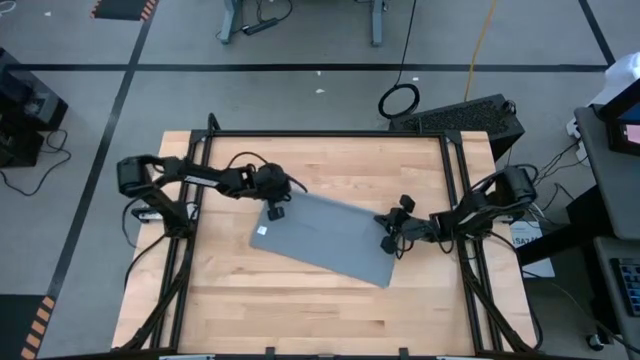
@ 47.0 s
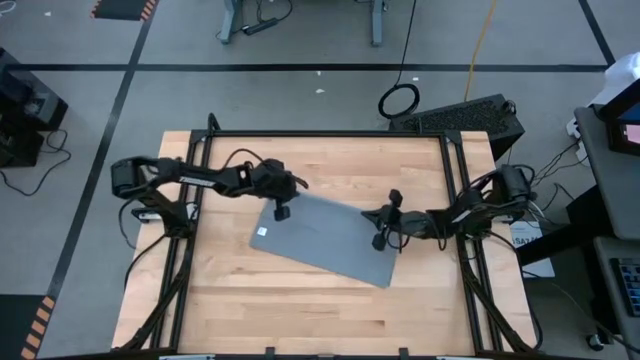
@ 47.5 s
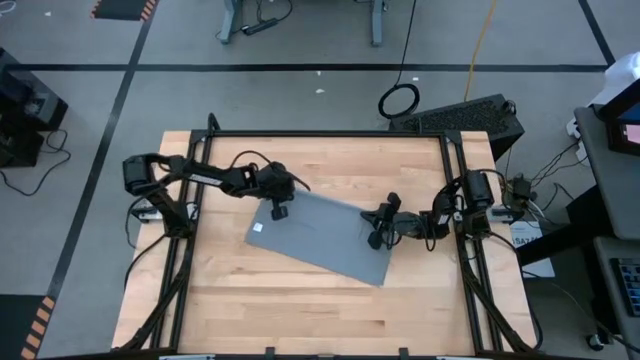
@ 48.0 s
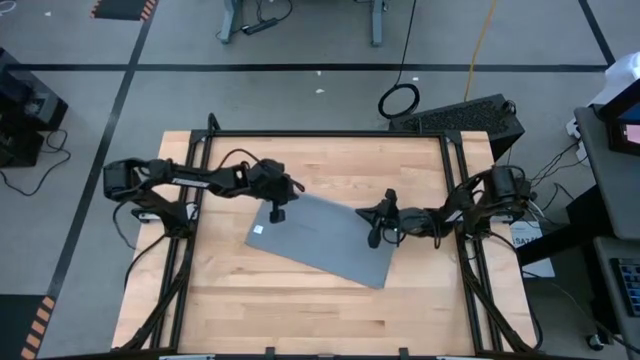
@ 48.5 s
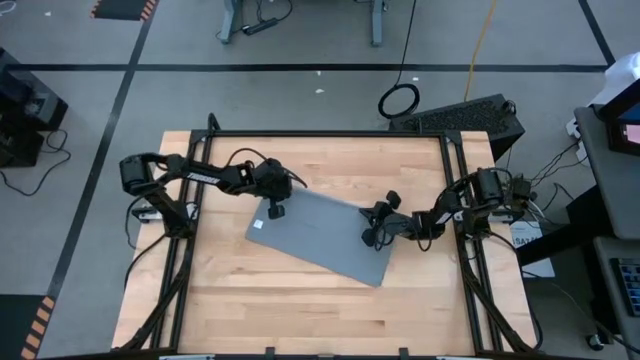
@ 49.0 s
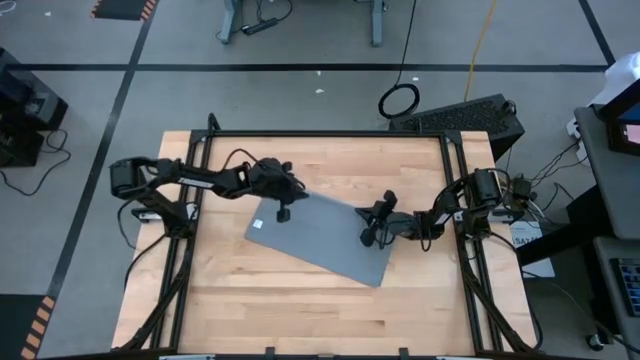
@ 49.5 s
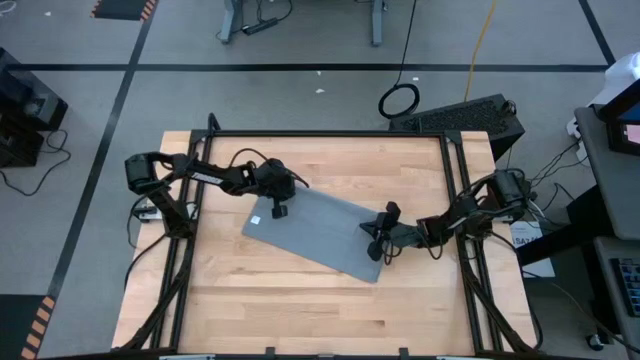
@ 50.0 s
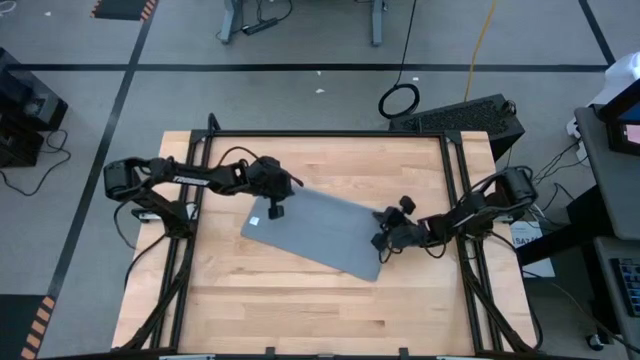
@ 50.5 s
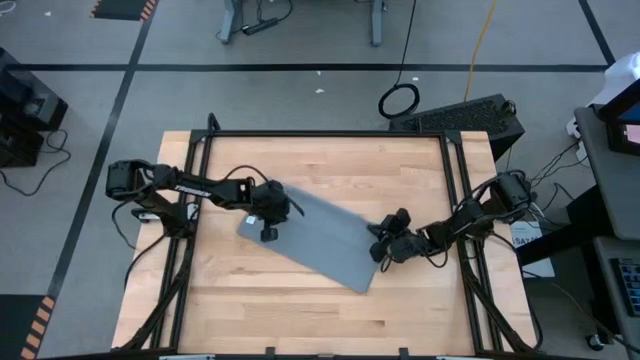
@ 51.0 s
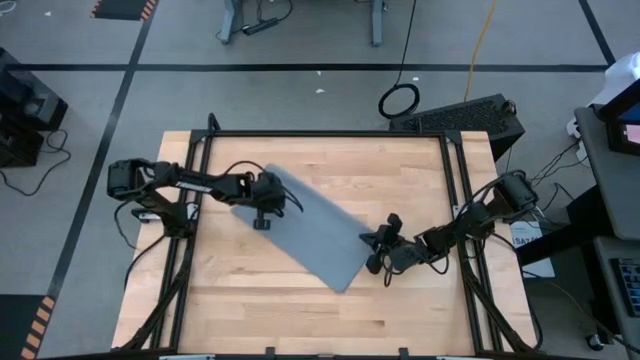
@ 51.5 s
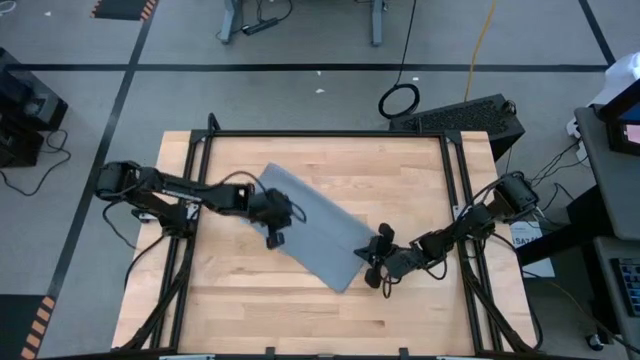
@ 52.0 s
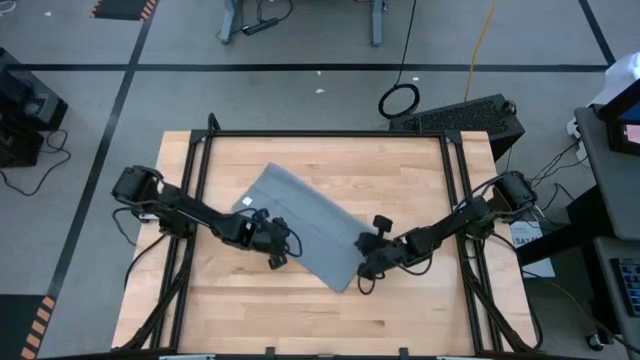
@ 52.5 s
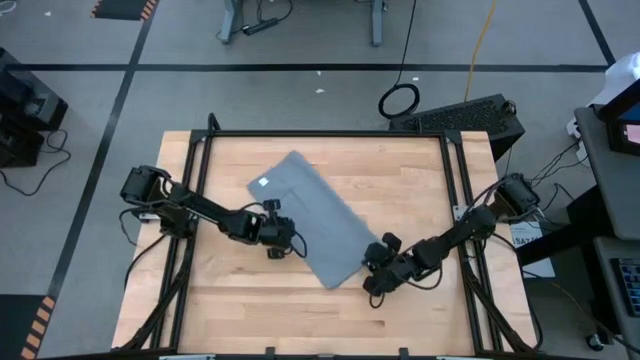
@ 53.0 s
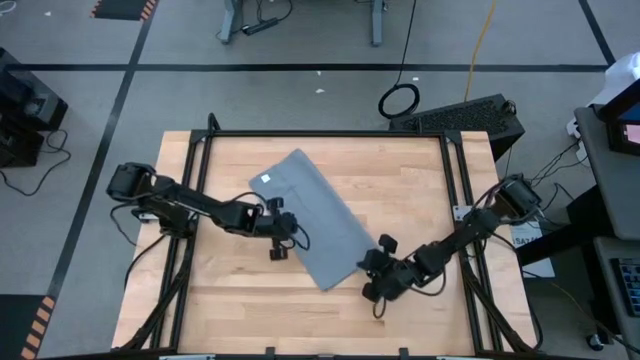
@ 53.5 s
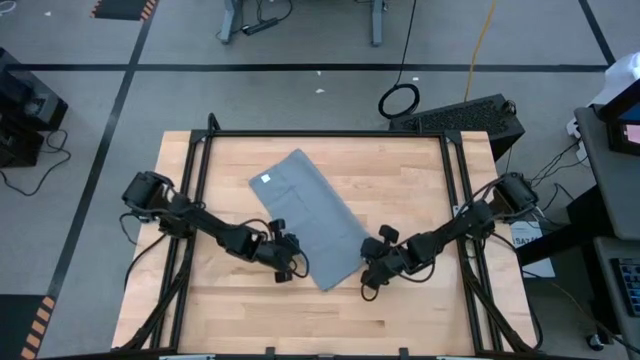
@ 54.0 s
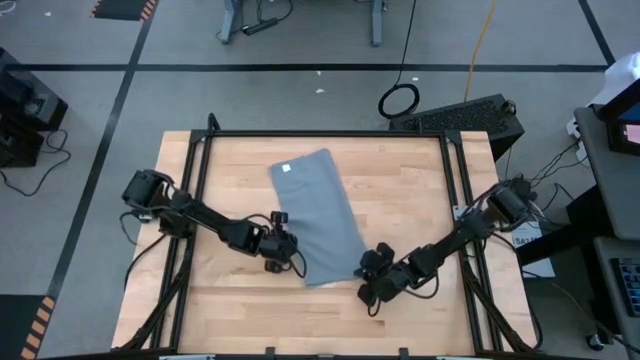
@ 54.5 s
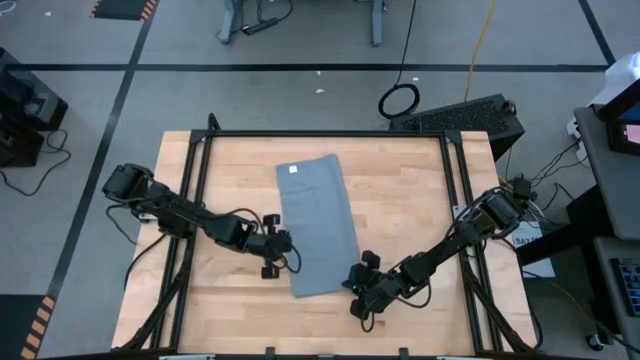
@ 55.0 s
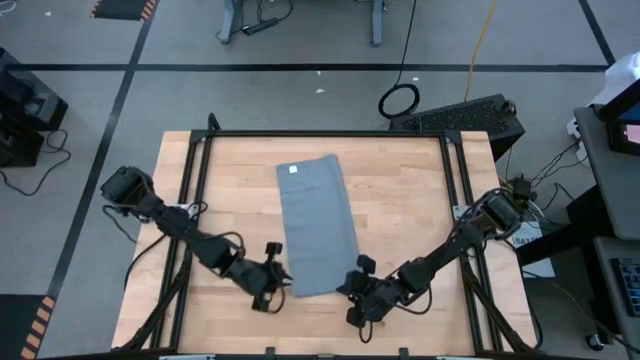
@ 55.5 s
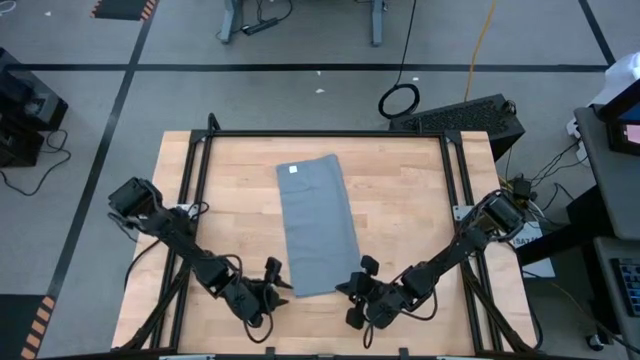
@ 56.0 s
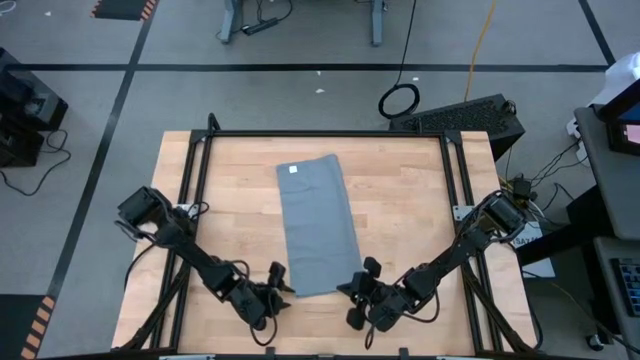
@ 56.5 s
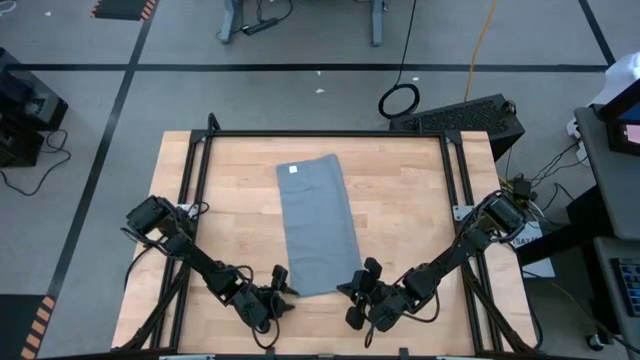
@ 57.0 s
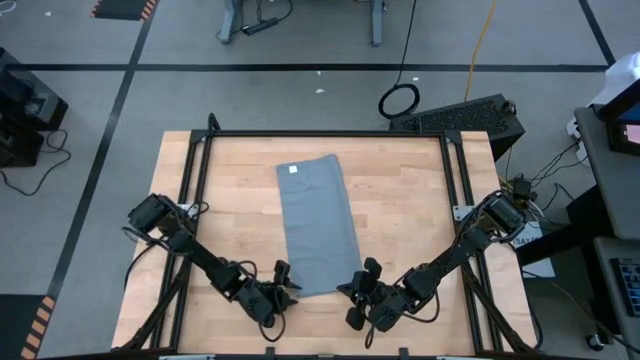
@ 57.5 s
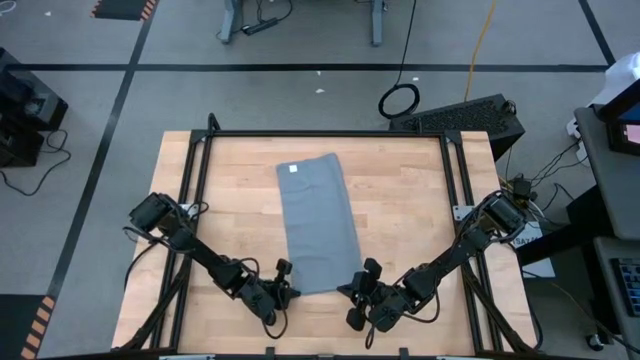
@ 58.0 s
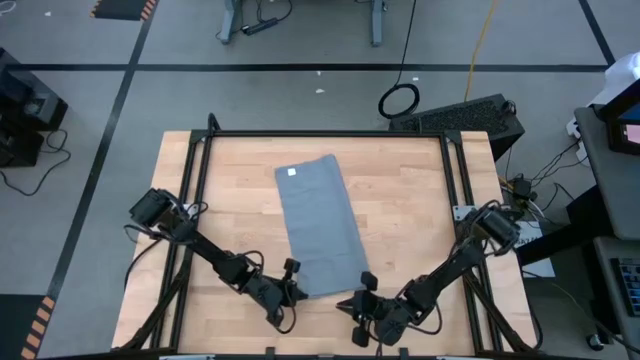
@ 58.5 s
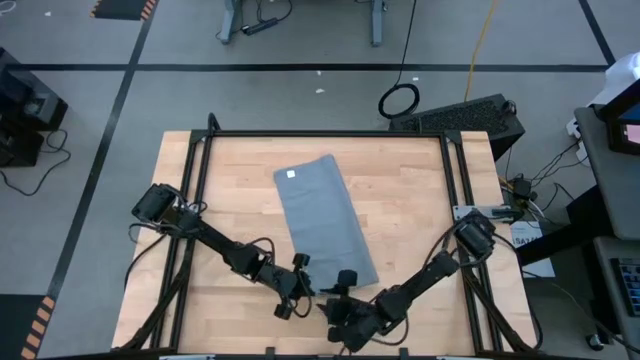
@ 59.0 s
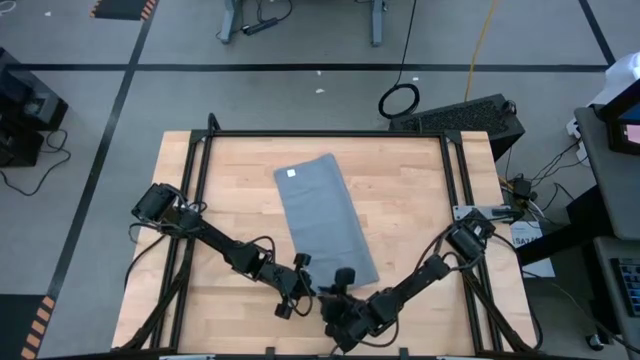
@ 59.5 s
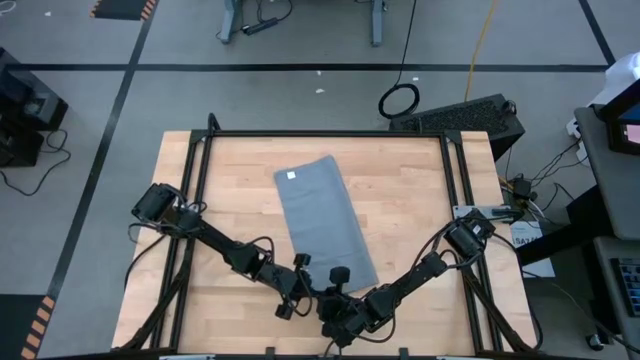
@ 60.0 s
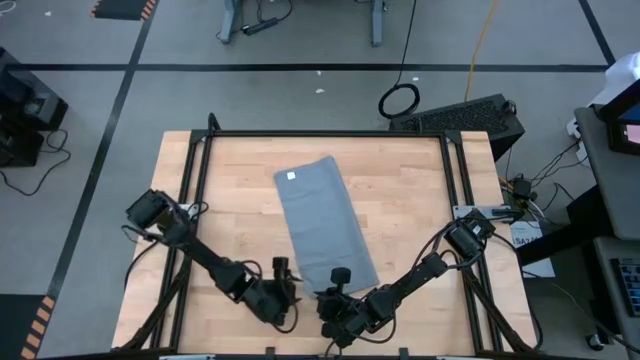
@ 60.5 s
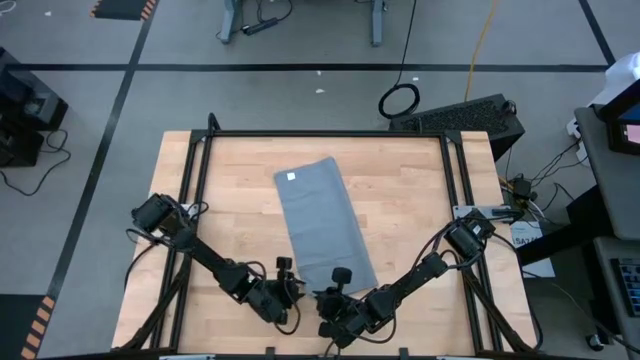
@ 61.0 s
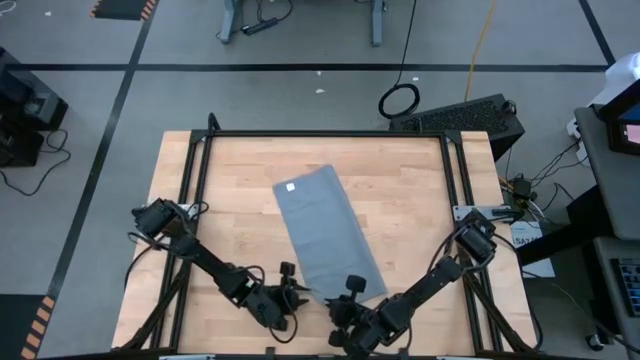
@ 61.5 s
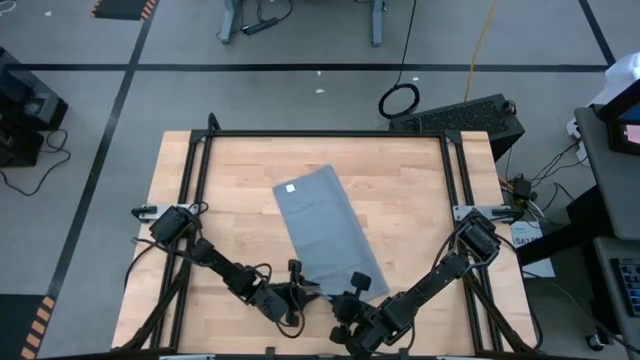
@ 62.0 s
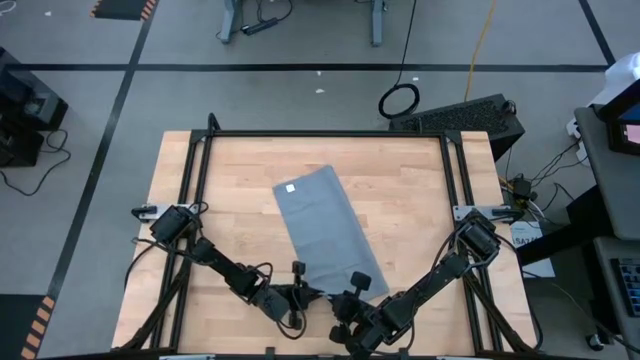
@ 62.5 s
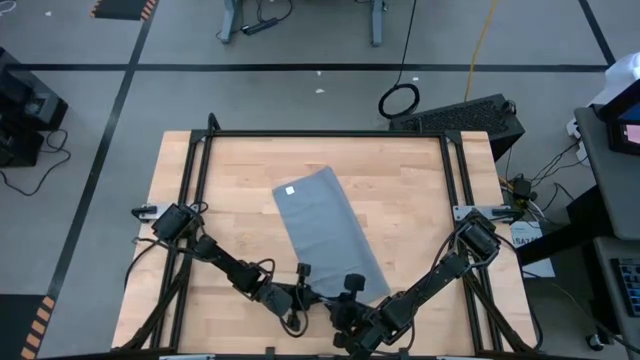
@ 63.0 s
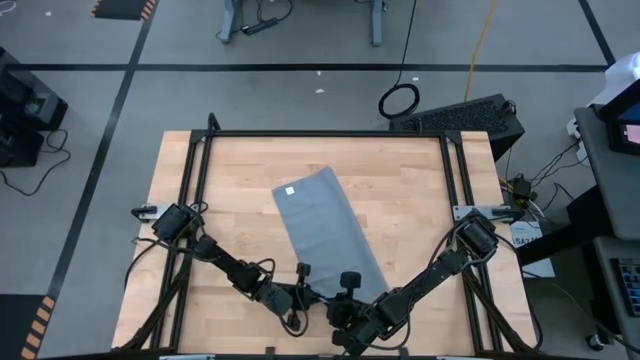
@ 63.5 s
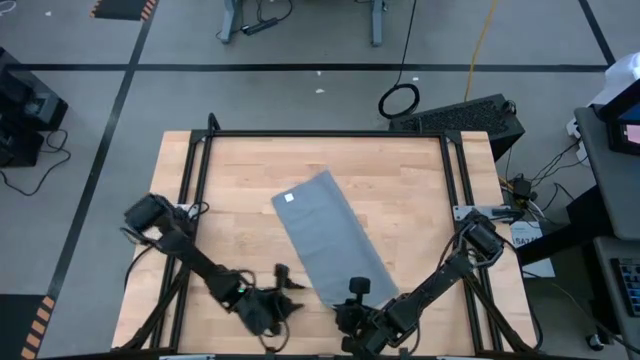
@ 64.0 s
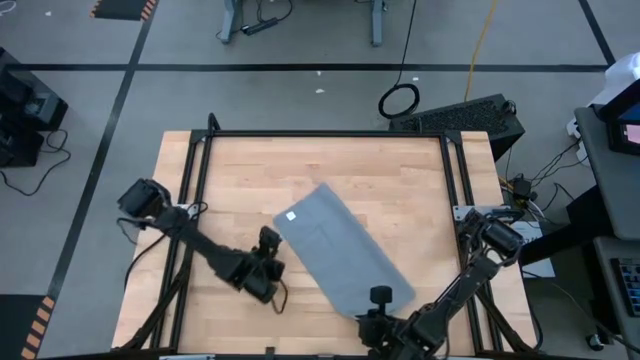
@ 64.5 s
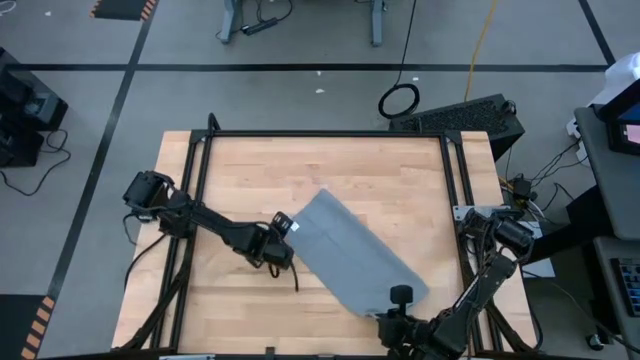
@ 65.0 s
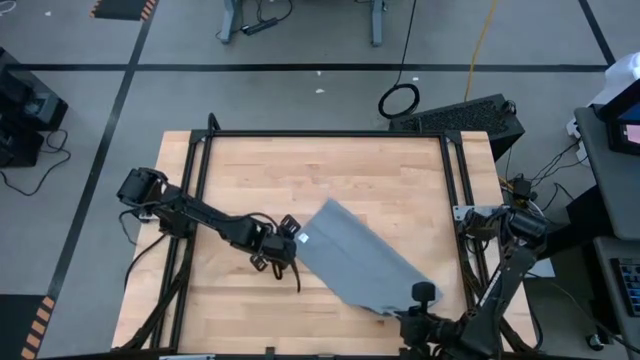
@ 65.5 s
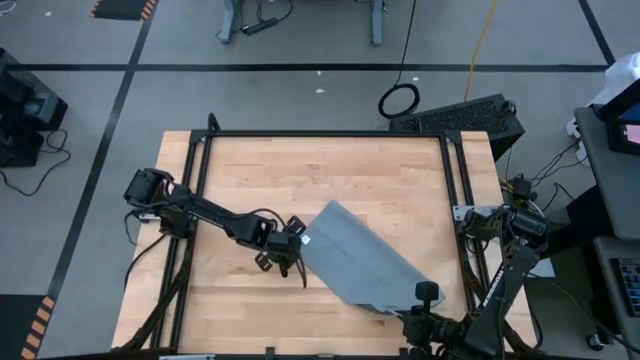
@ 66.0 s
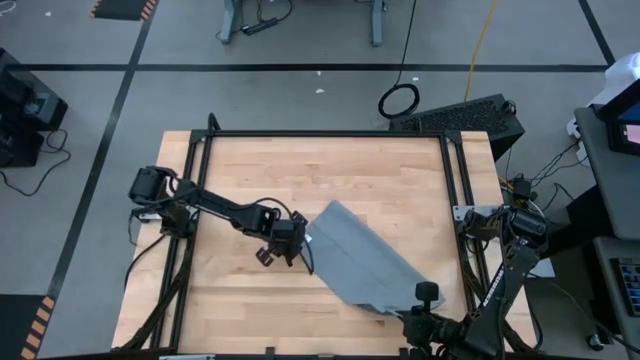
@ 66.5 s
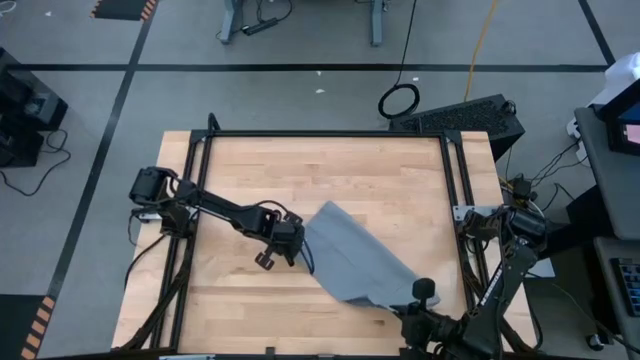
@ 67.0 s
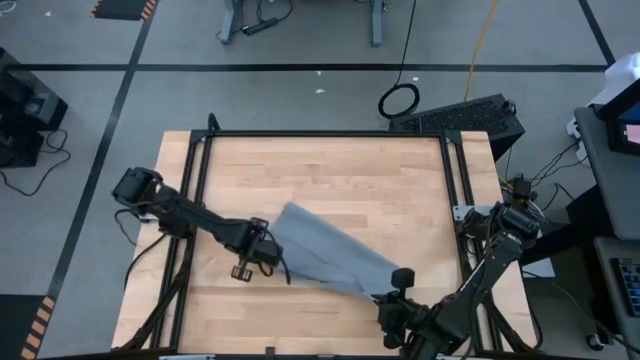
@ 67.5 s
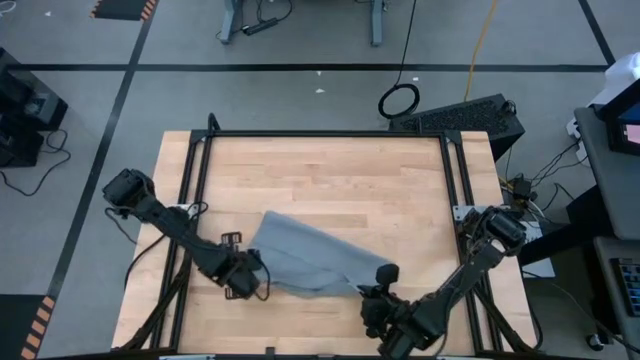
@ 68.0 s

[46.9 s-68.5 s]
Task: Roll towel
Fold the gray towel on the table
